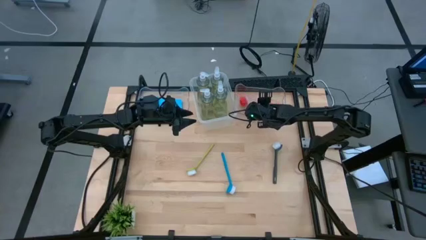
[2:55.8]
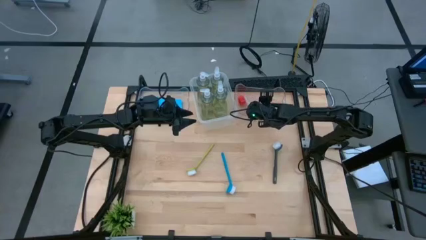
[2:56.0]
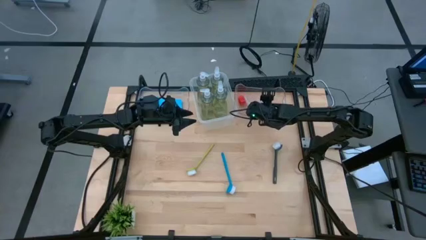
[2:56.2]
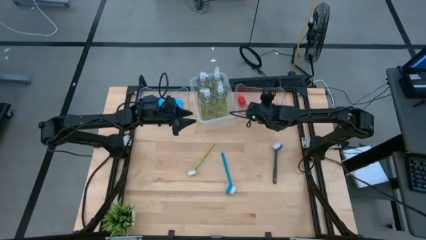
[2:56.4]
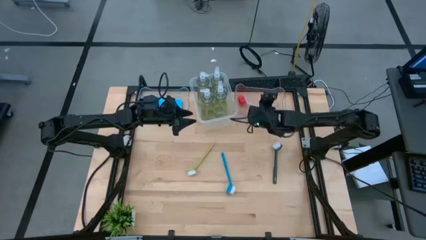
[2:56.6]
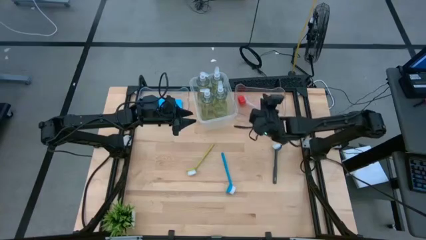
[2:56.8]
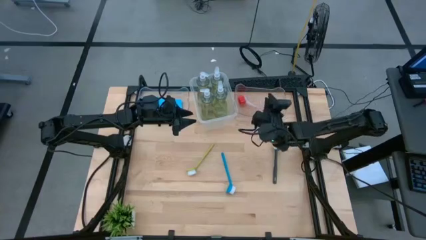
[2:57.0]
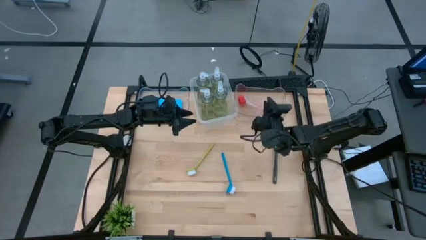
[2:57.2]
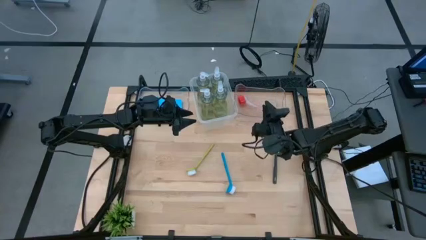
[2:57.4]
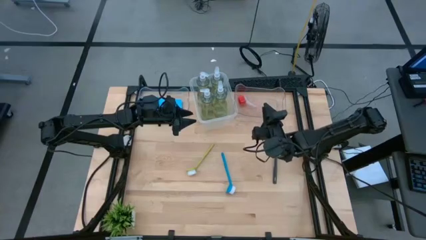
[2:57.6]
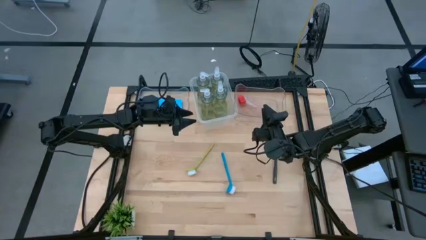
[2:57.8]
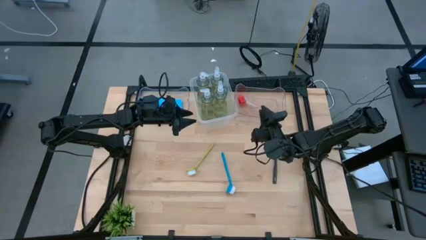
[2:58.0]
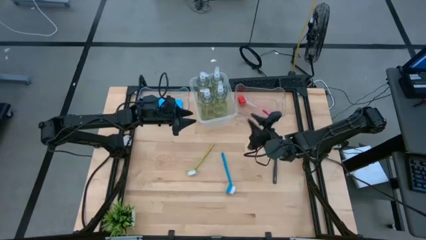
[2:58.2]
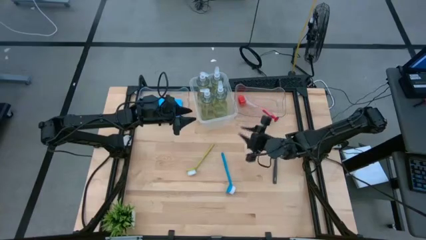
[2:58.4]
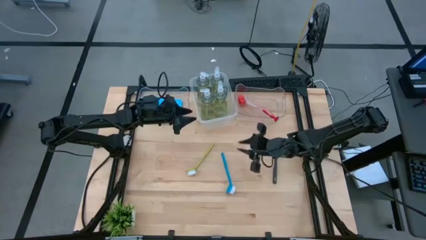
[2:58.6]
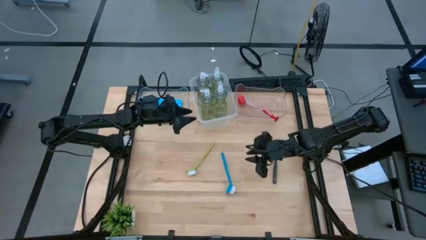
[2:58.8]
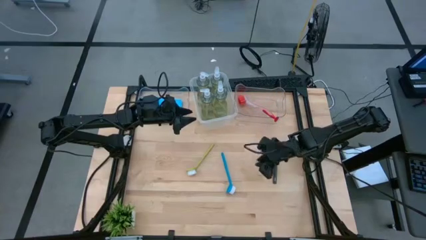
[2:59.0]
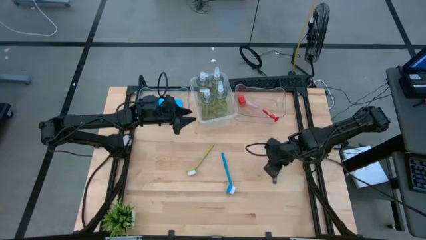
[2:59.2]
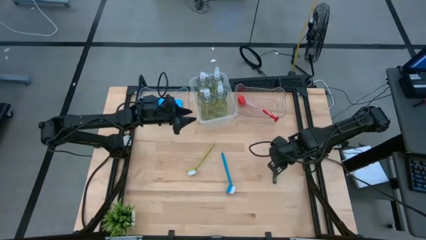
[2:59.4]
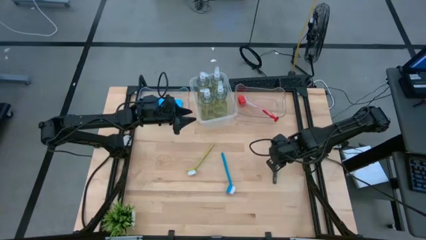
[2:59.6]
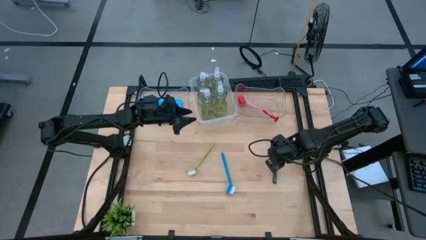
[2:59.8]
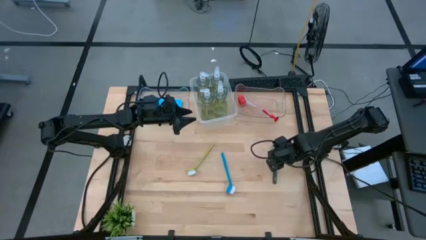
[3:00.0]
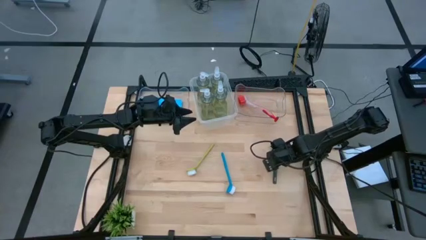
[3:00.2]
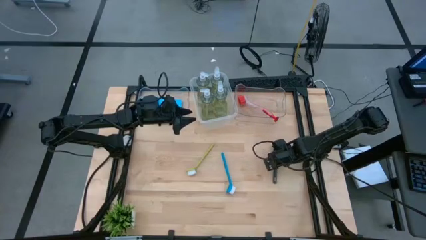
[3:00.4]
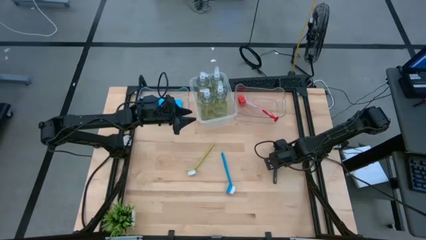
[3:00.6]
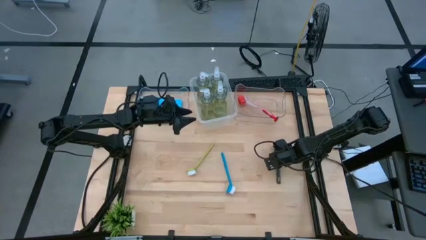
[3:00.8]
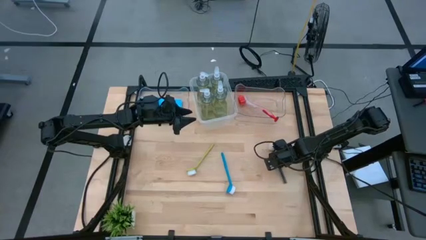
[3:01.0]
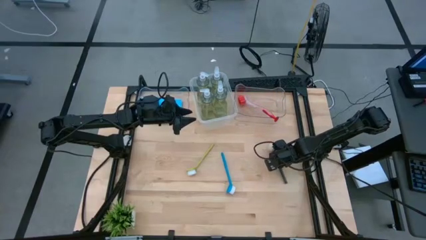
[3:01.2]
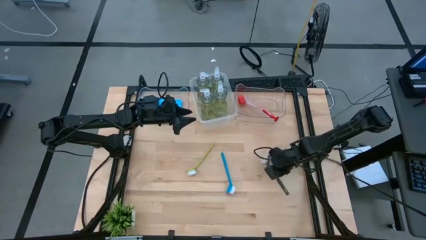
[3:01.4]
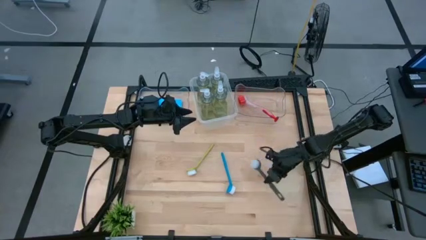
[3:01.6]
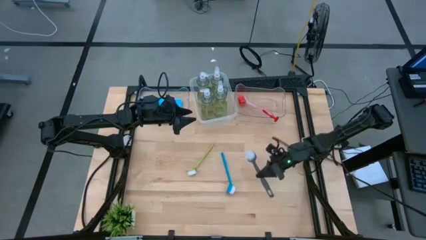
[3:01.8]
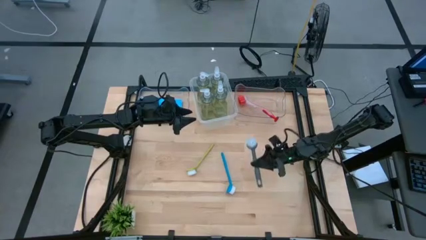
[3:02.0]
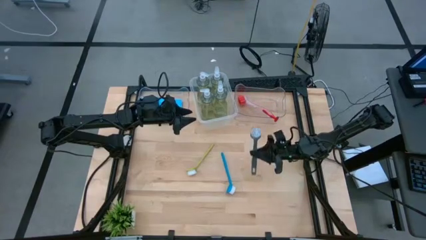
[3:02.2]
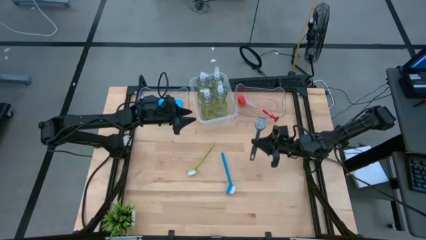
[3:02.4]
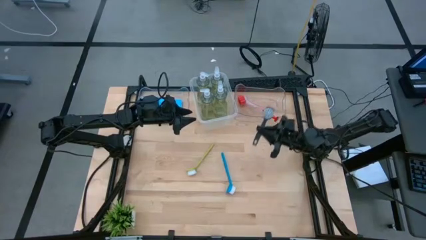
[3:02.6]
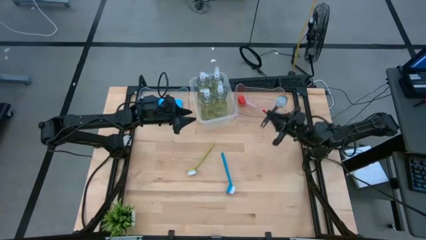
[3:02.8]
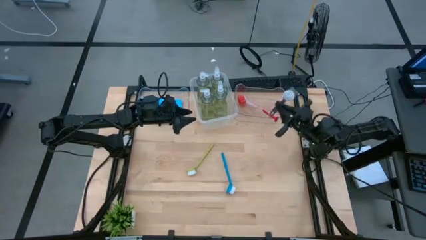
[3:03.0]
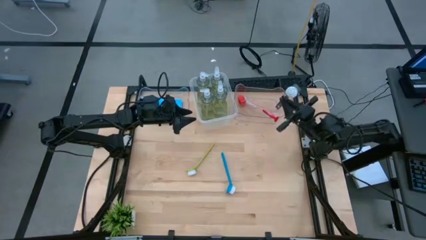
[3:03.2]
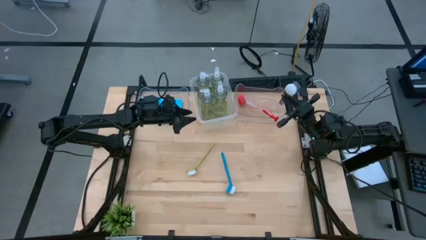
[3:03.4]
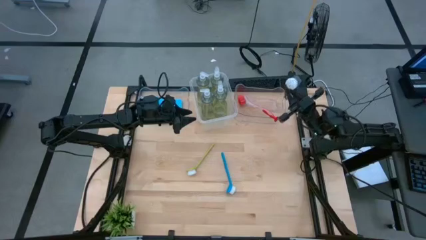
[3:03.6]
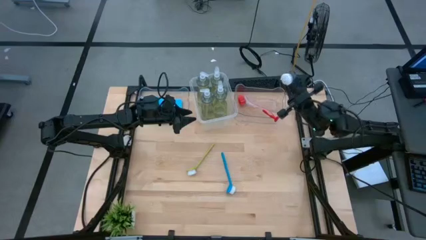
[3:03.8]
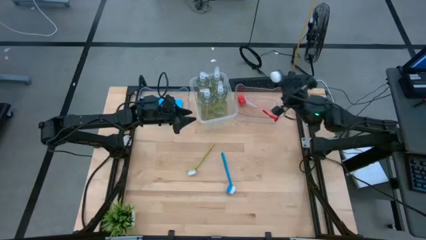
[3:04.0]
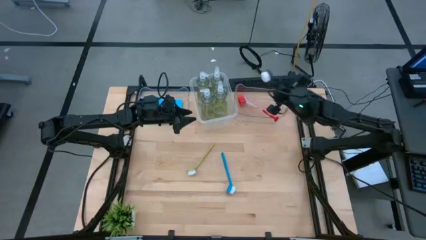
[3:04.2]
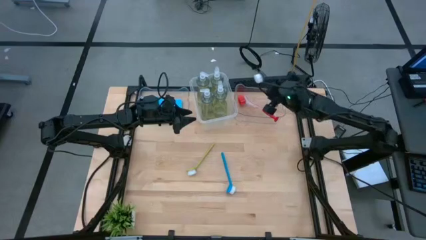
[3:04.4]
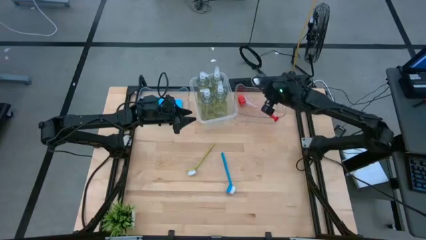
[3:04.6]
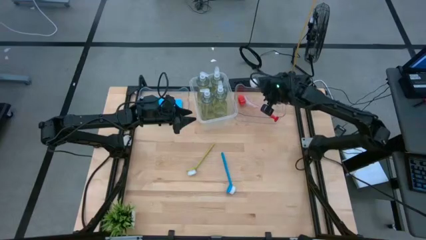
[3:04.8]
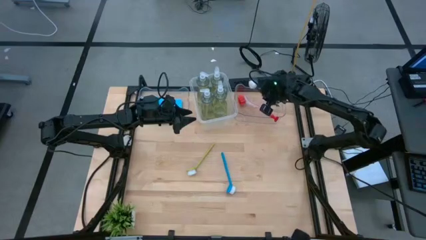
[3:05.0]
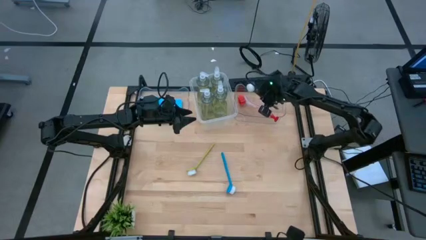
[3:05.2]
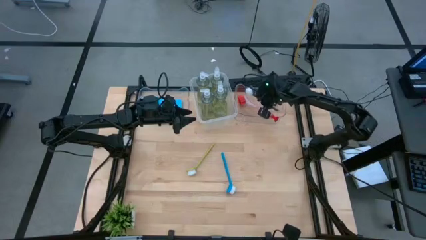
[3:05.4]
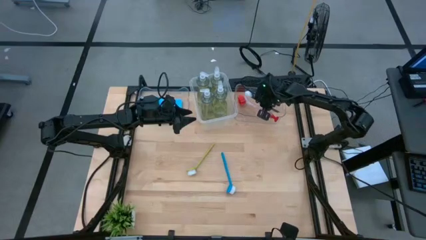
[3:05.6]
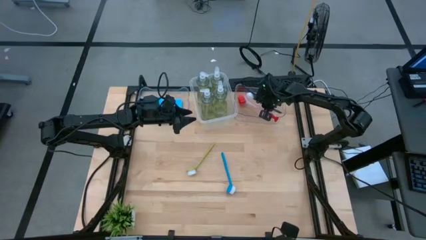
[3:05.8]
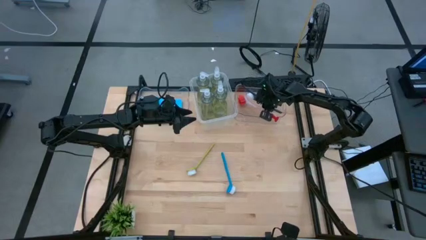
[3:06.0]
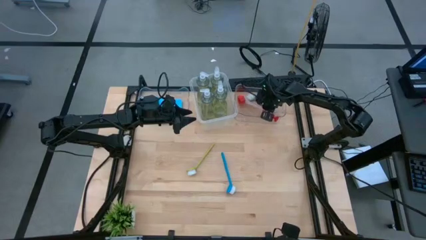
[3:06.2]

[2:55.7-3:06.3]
Task: Pick & Place Kitchen Sink Supplies
Put the black dish brush into the right transparent bin

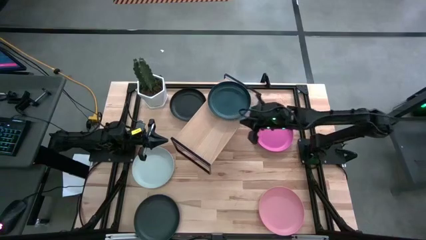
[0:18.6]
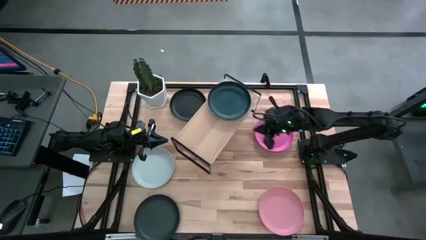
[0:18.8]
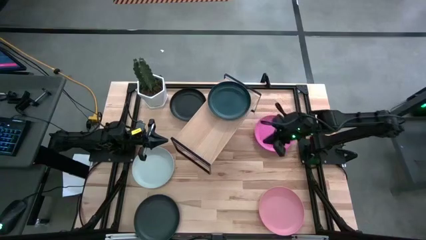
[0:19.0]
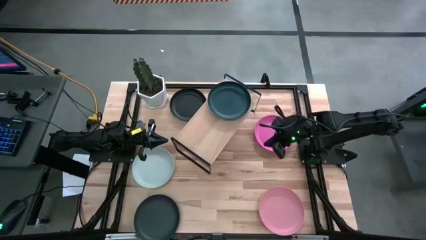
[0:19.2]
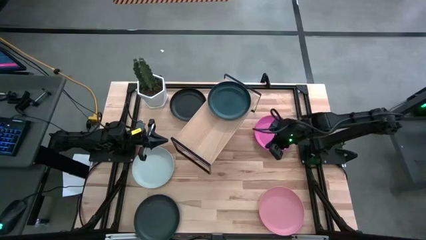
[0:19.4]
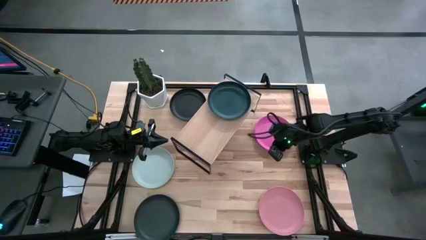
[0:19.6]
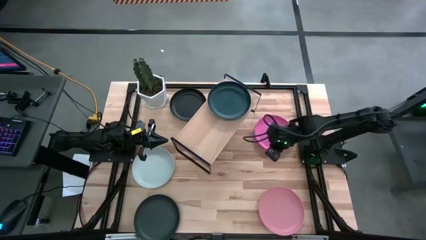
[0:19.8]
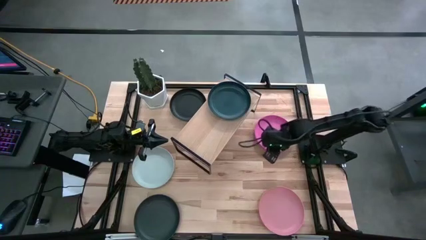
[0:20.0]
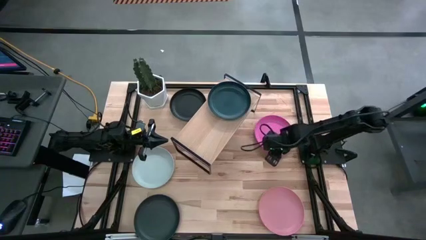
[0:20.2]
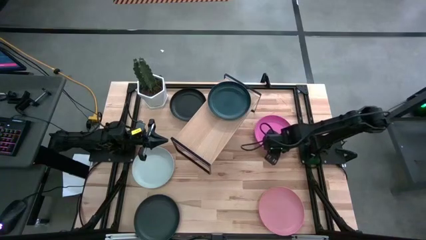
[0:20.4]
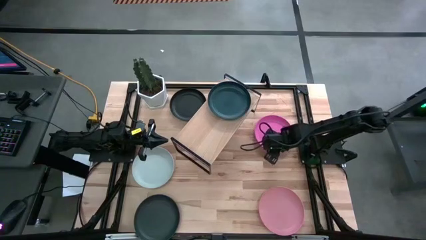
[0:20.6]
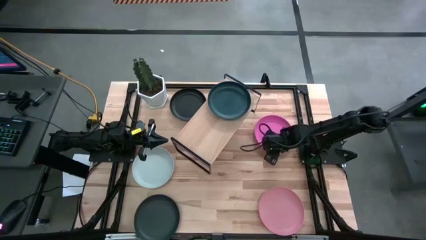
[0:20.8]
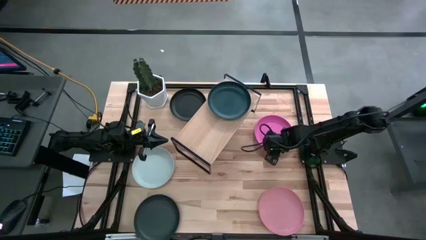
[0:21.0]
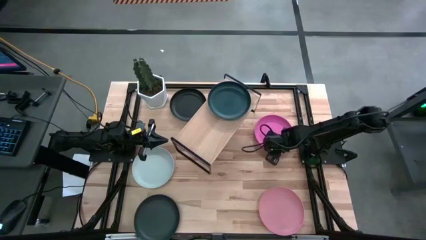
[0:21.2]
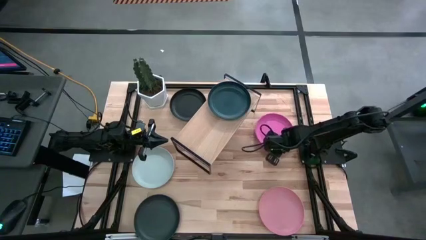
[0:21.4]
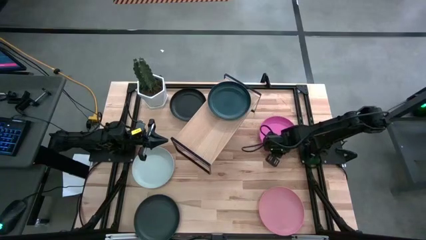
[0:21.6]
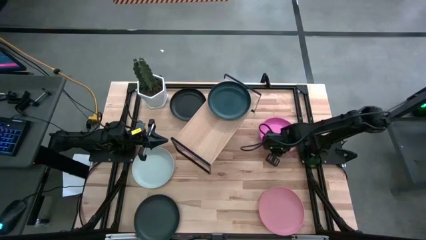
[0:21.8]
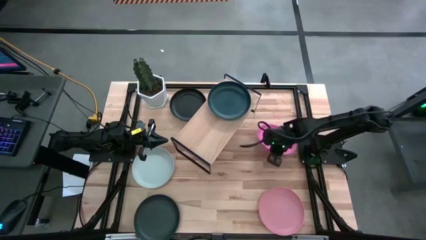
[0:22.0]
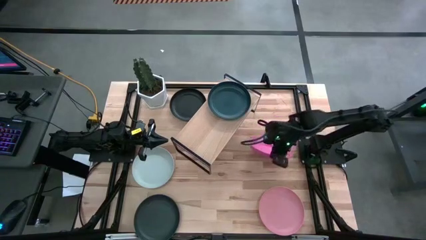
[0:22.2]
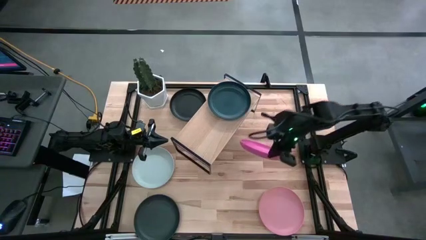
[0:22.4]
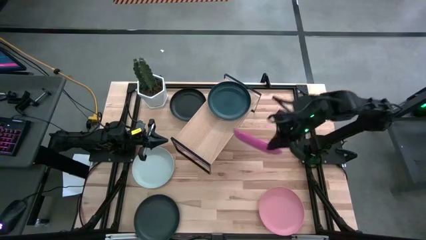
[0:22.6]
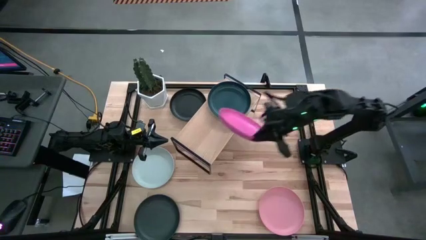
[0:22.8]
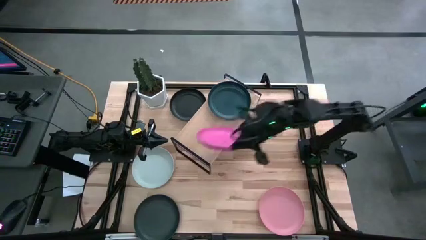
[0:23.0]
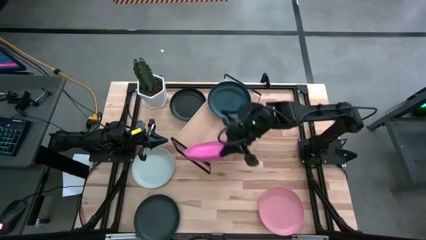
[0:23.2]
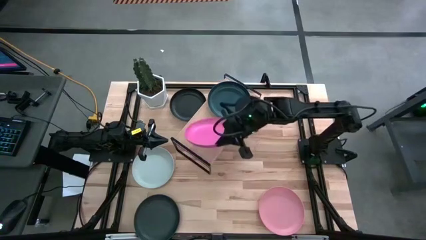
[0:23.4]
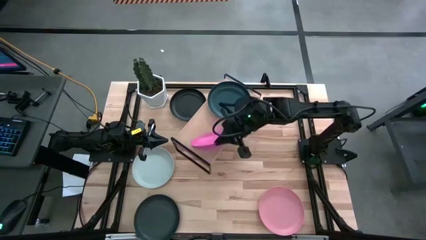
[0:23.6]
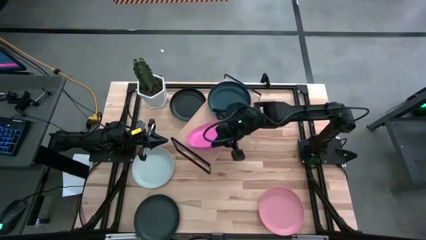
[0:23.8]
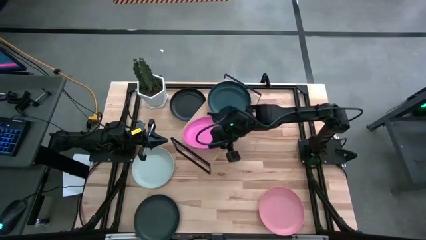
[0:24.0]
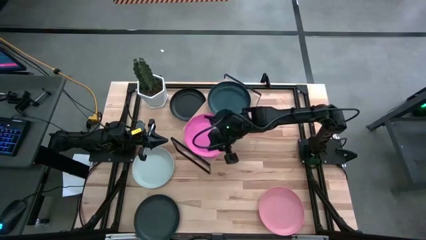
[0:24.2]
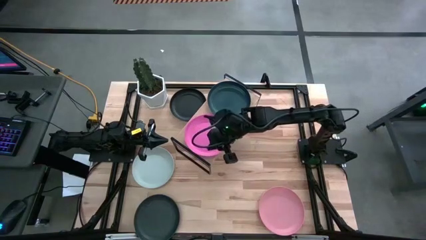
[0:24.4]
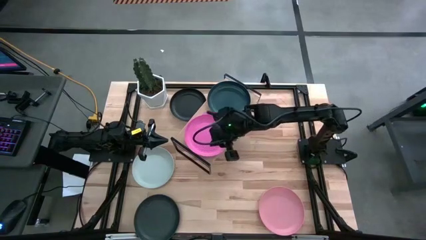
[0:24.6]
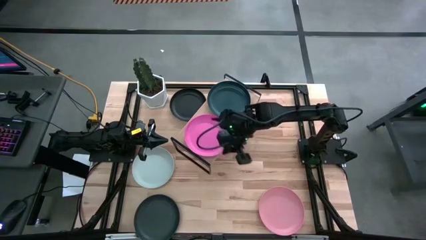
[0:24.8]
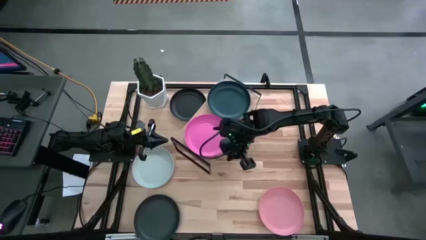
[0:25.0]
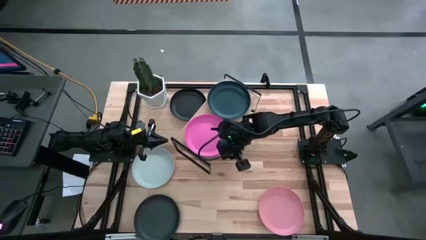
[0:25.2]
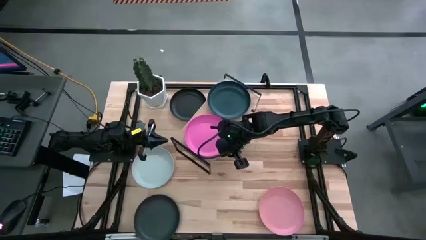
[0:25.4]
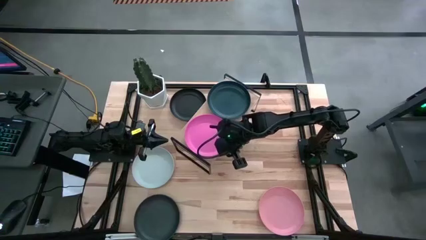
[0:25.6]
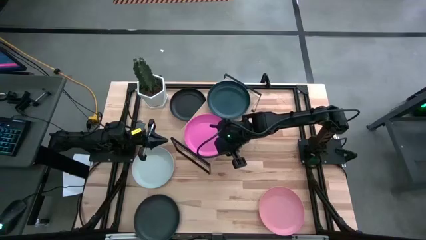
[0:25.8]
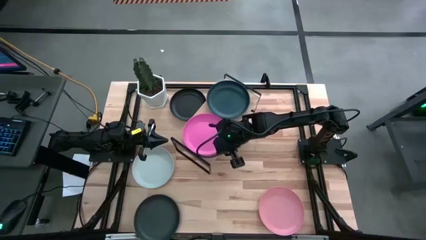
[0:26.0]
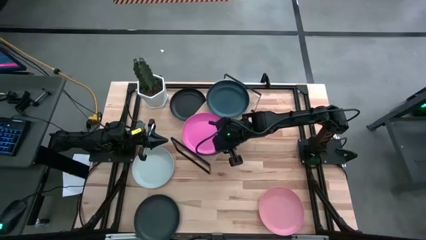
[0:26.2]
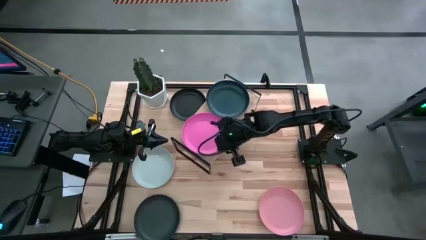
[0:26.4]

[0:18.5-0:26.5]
Task: Place and stack plates onto a shelf
Put the pink plate on the shelf
